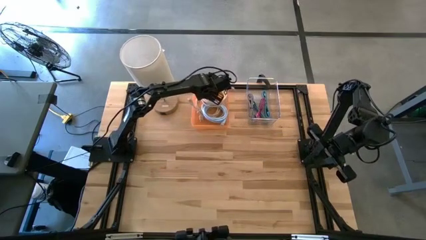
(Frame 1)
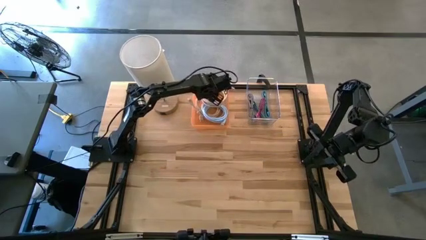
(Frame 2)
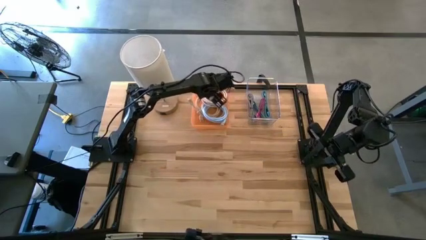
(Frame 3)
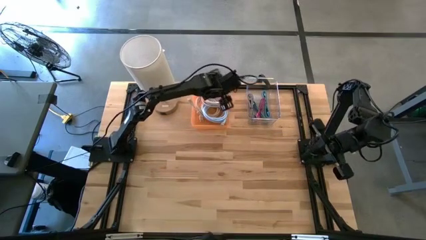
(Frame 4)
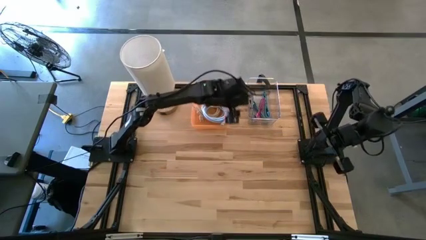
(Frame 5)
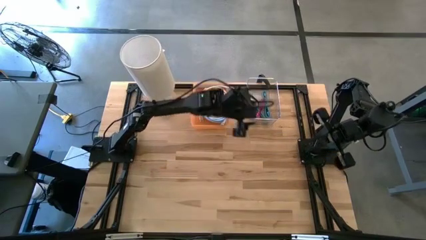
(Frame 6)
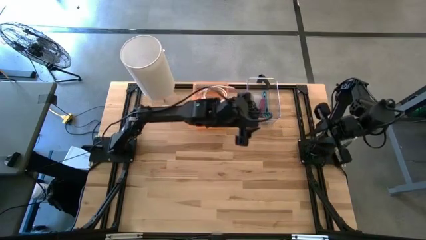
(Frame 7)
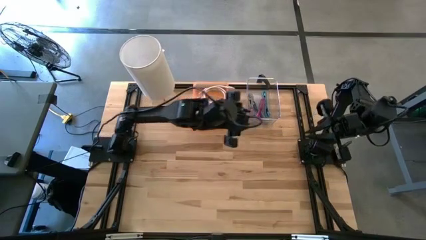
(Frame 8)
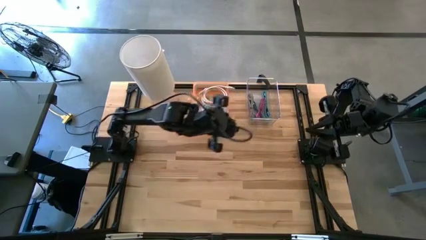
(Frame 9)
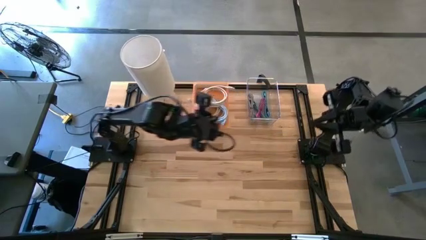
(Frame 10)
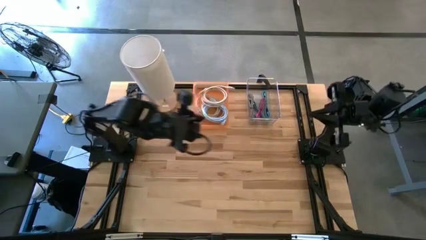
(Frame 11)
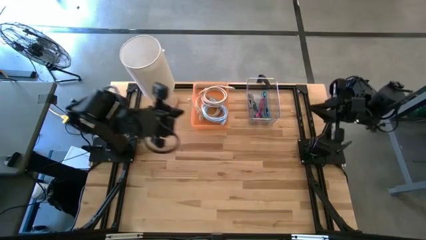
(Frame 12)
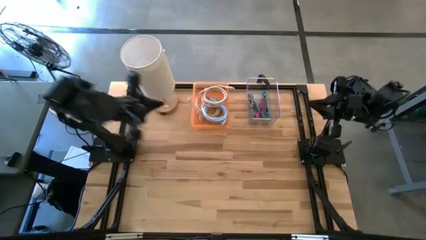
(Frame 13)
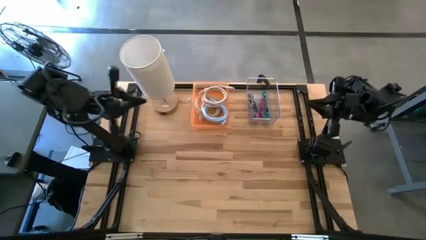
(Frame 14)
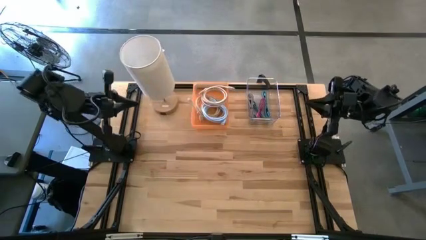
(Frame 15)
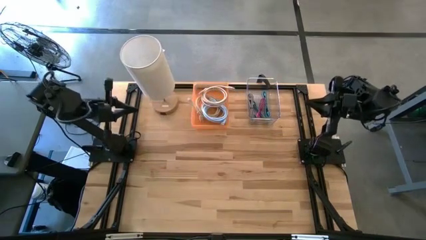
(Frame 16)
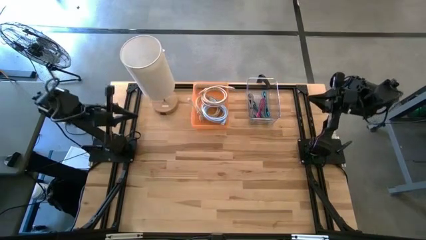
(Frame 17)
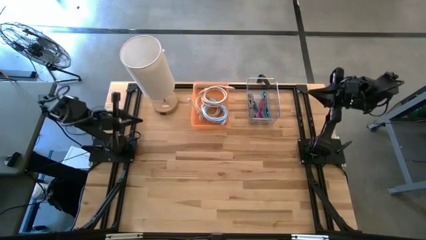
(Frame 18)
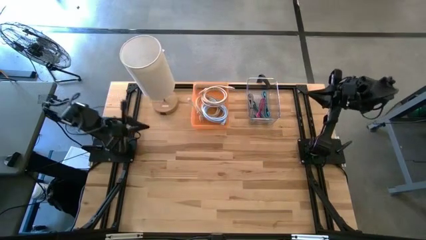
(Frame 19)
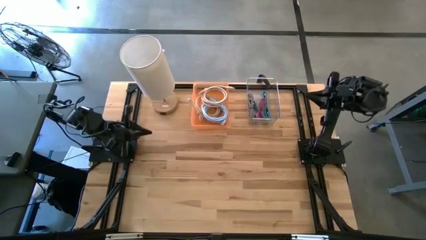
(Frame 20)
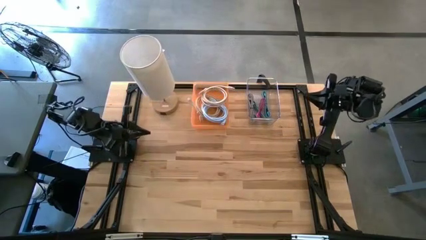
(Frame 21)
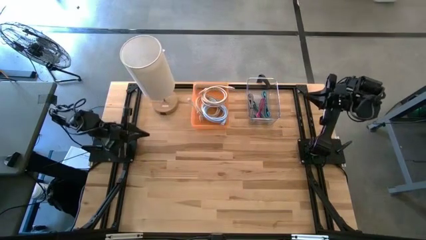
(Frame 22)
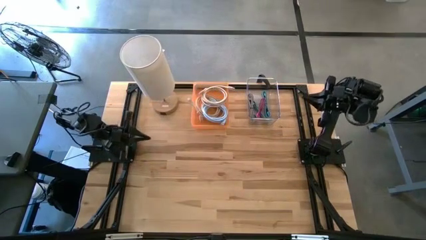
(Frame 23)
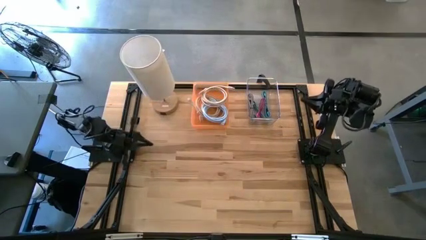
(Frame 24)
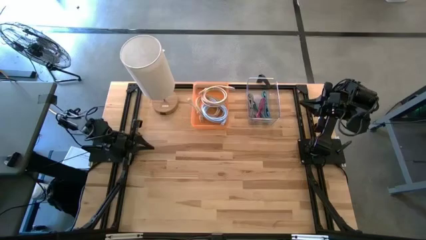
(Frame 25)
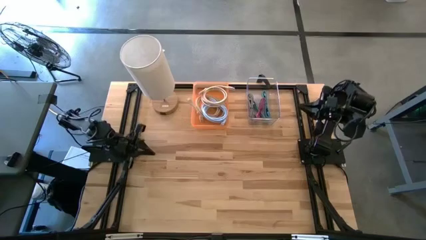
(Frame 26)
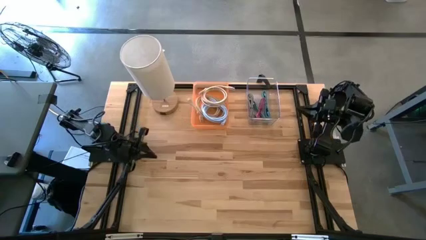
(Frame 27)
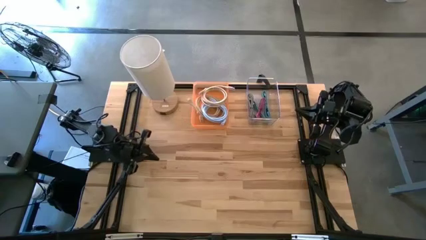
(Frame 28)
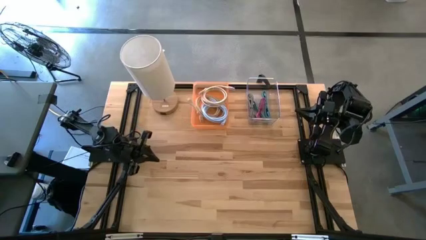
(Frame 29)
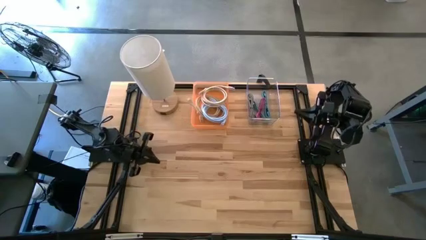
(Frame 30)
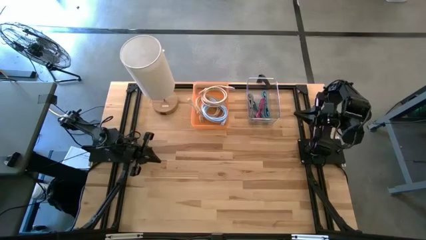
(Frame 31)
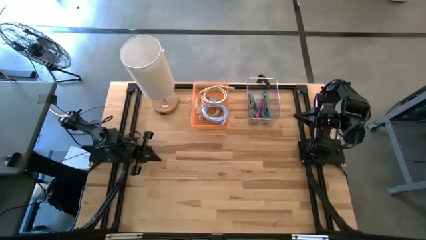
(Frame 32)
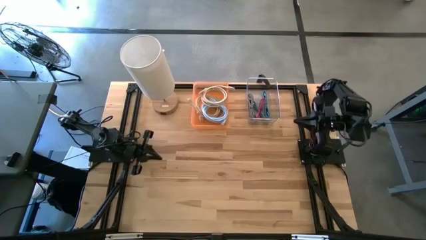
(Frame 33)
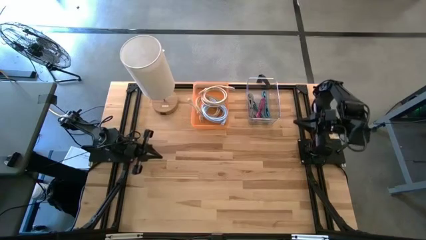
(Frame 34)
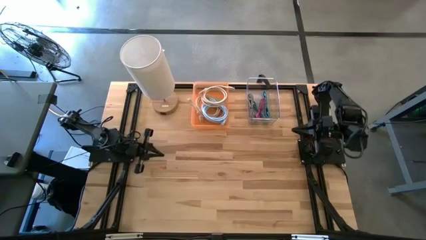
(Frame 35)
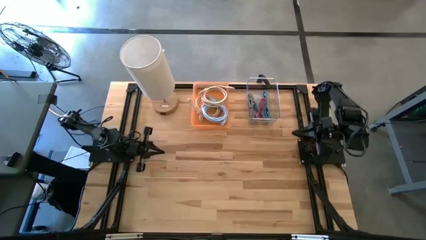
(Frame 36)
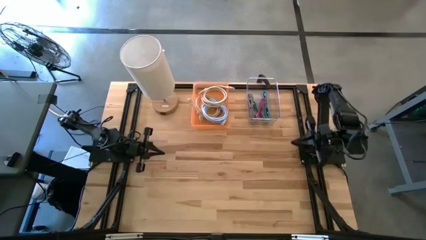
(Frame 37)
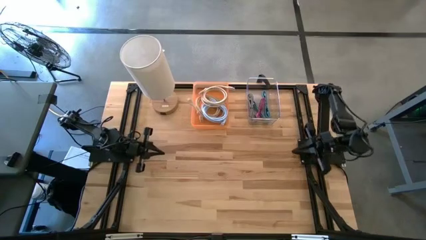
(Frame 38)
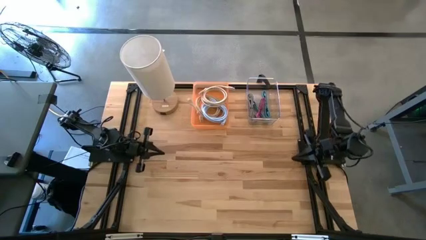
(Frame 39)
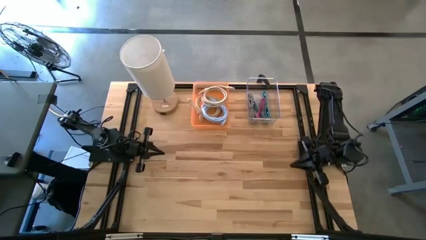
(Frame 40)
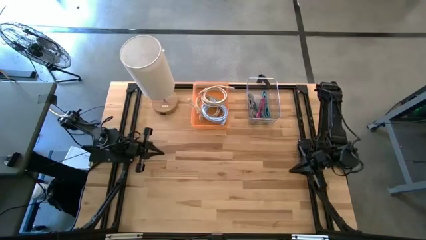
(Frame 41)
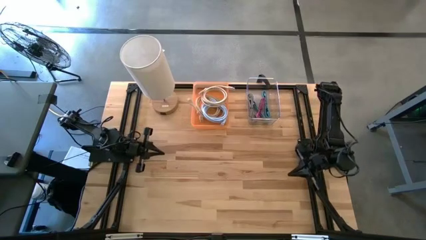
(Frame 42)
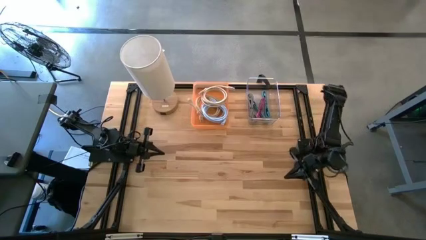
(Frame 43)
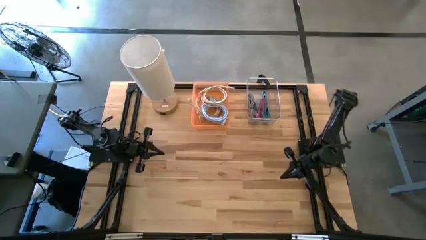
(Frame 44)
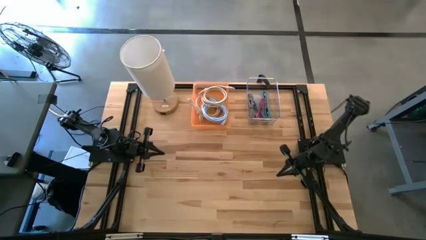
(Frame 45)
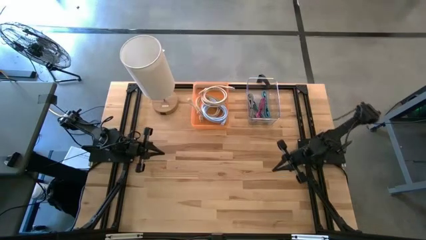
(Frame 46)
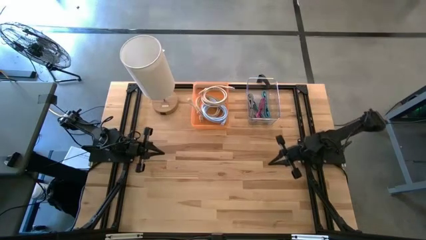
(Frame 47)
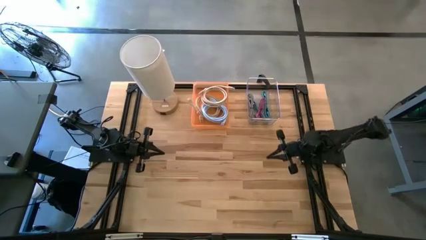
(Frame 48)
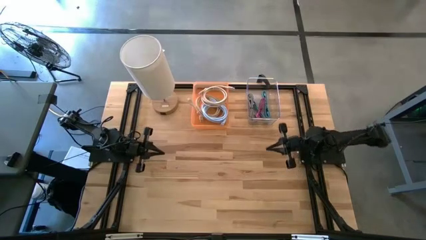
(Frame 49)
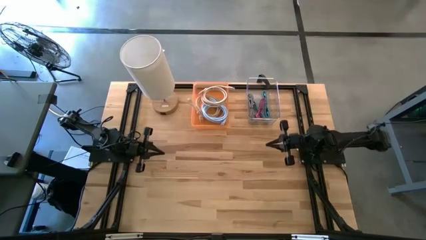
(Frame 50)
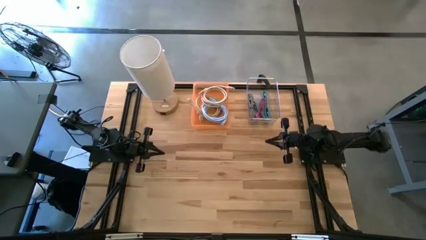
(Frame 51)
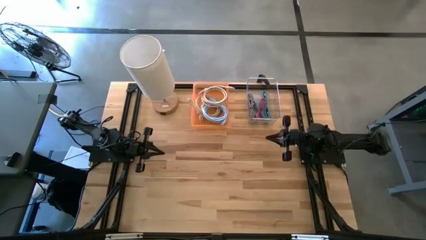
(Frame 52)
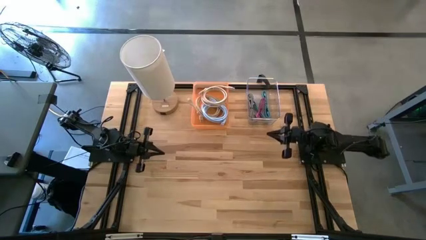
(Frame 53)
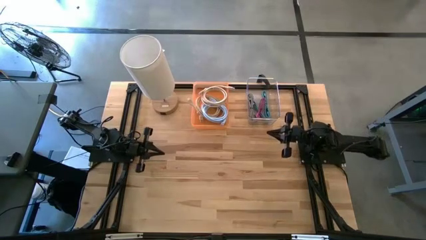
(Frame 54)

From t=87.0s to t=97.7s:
Task: Pick & Place USB Port
Return to Home Position

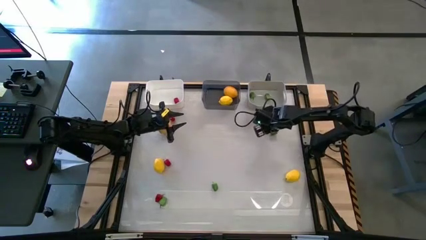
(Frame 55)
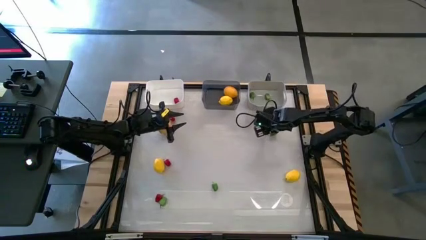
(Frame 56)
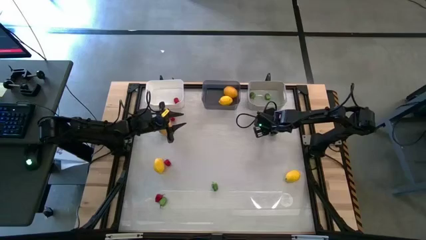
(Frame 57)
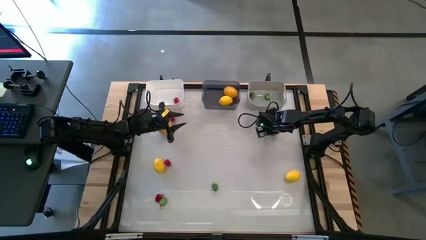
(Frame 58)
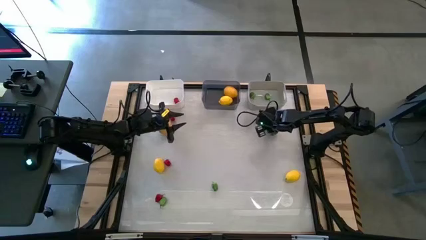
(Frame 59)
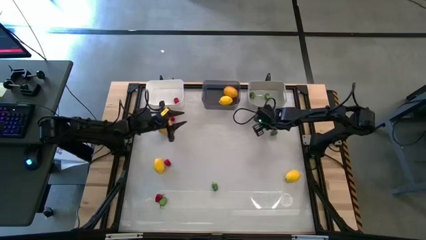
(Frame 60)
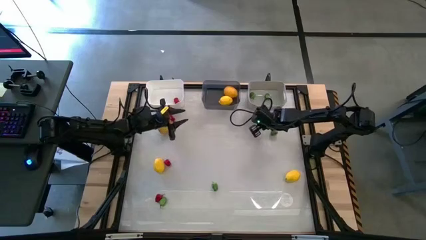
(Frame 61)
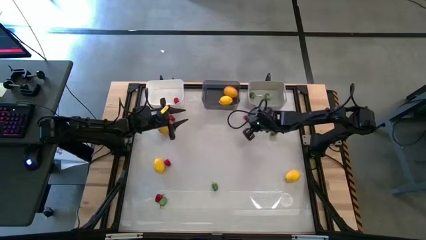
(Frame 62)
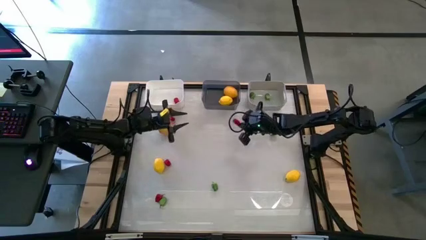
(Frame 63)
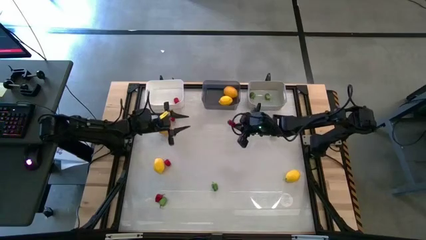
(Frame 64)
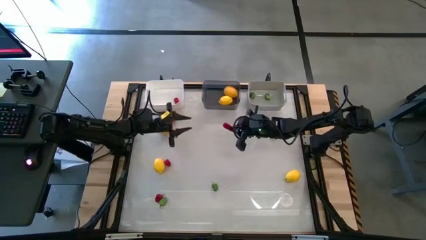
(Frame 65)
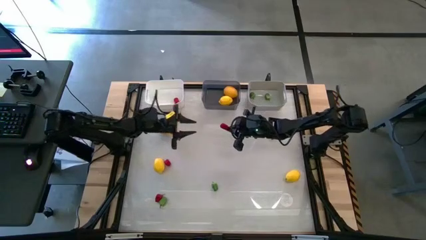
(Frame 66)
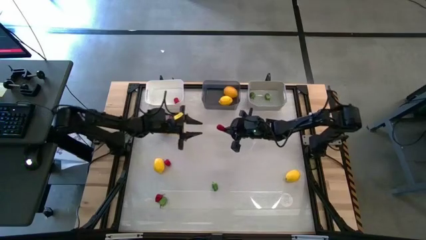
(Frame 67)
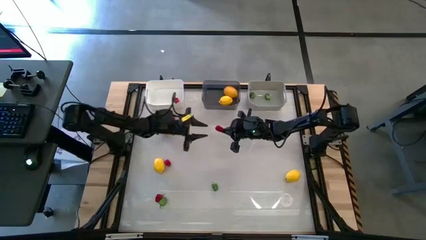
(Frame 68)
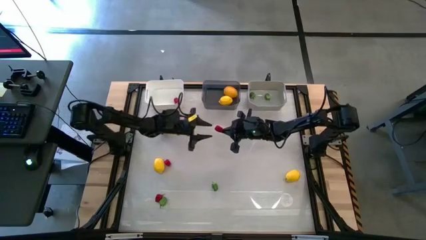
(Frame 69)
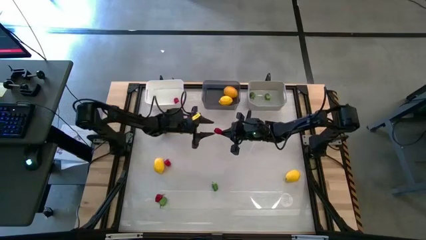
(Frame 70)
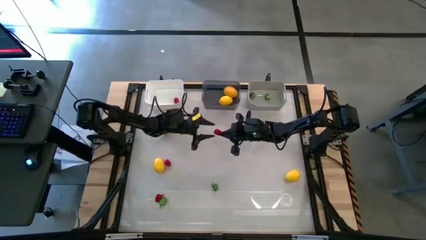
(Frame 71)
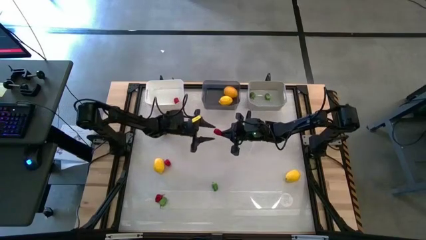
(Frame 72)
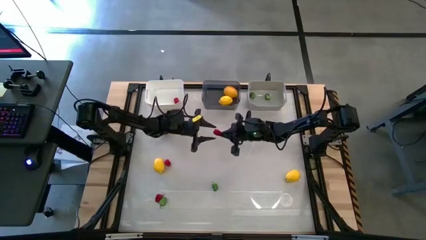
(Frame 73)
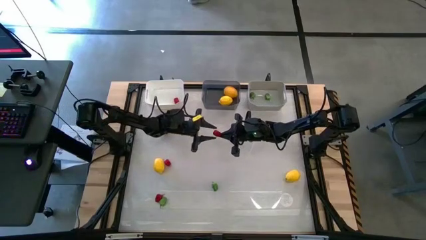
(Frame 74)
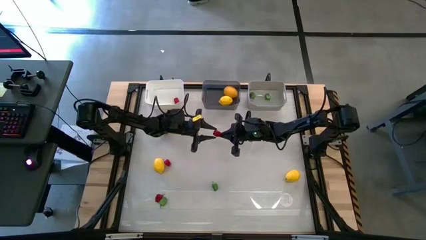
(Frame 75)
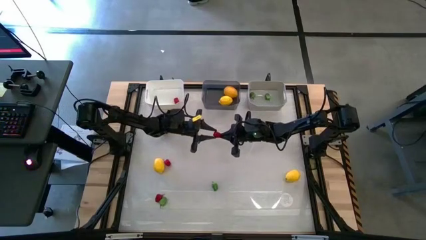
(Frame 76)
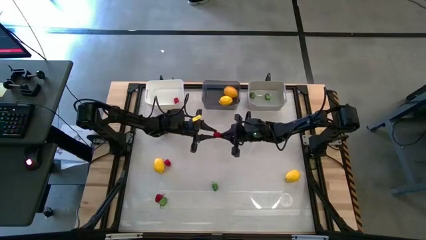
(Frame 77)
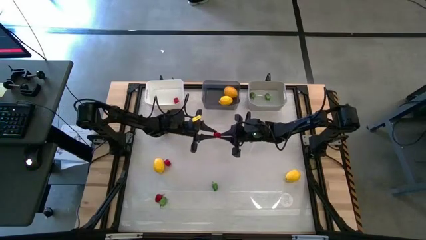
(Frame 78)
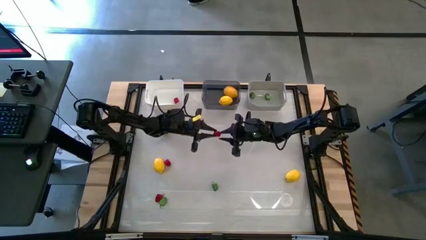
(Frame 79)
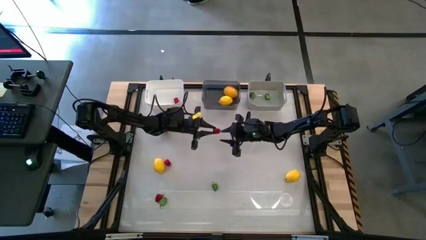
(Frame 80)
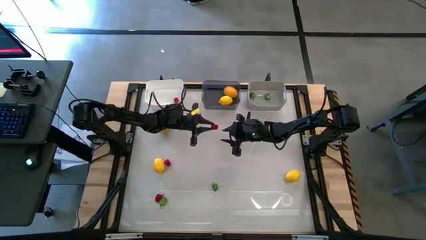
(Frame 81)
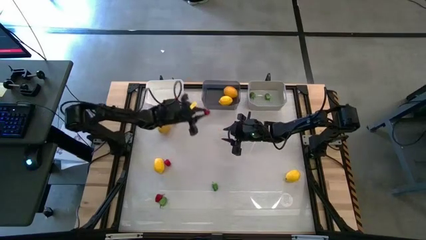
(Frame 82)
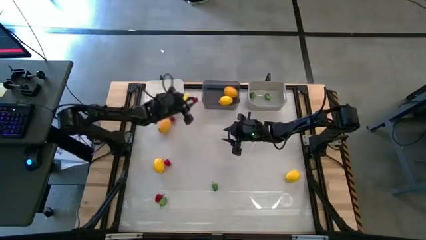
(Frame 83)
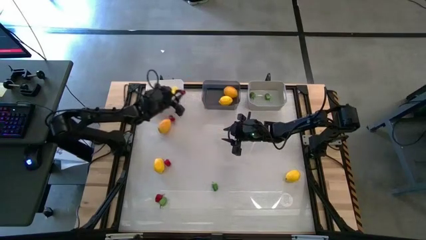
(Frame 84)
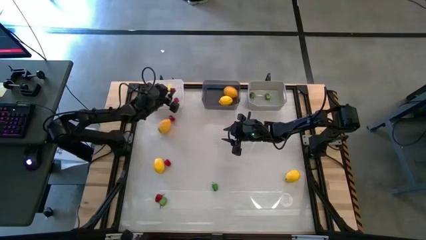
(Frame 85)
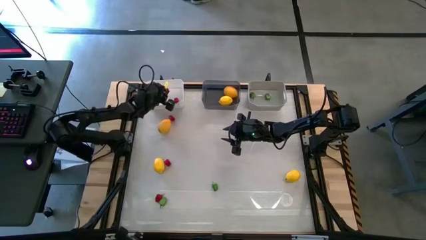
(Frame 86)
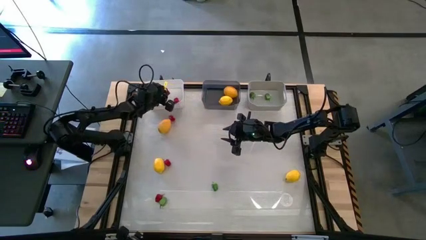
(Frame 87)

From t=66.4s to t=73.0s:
Task: Sort produce into baskets
Put the red bell pepper into the white bin
